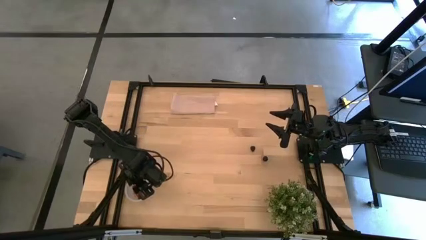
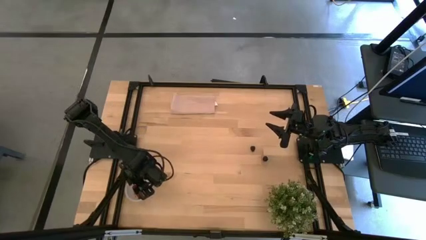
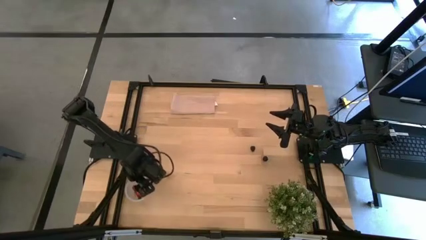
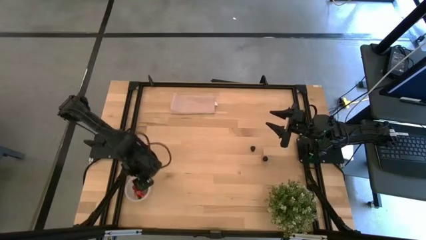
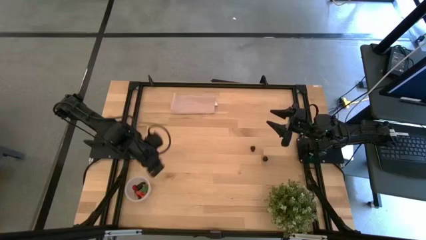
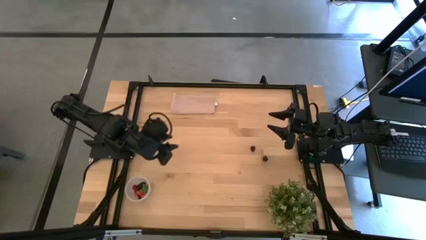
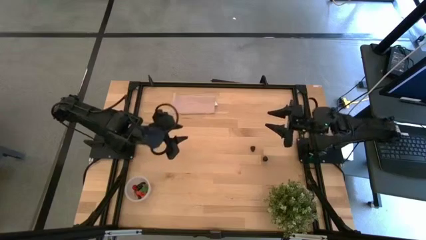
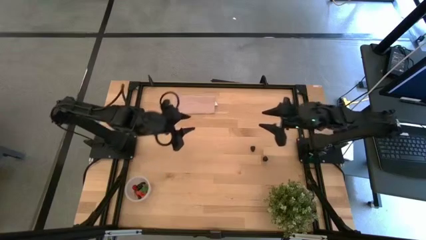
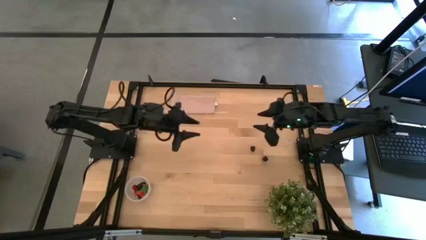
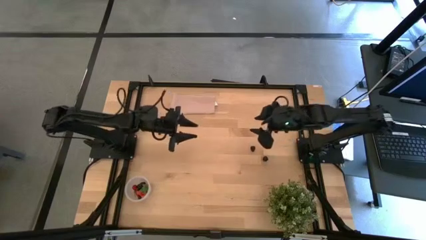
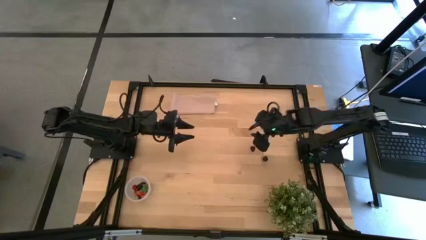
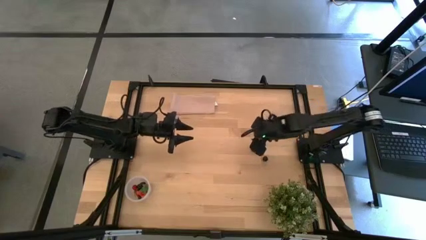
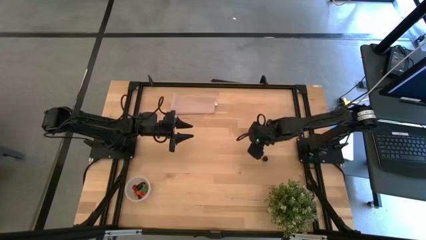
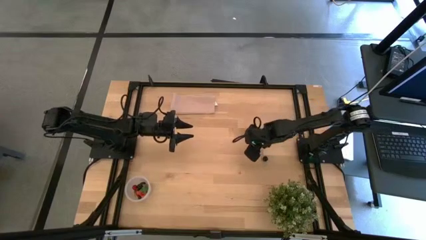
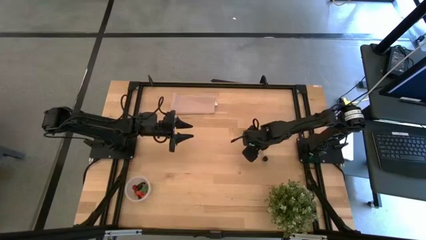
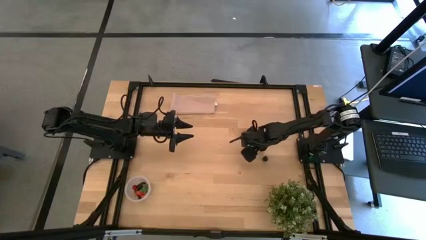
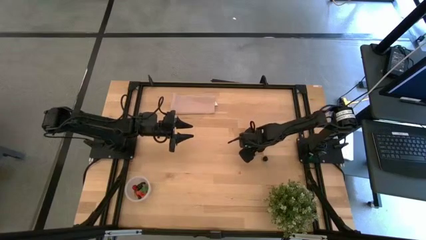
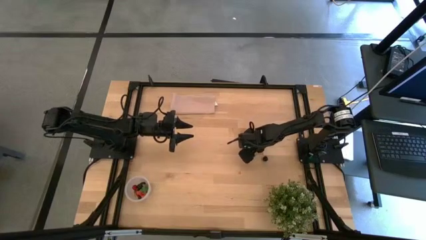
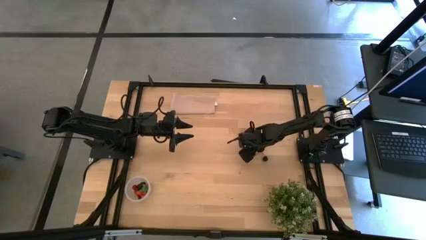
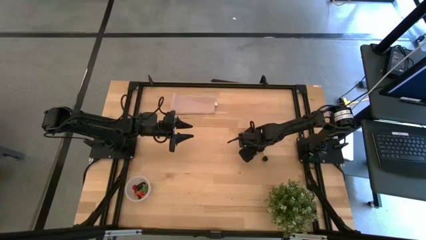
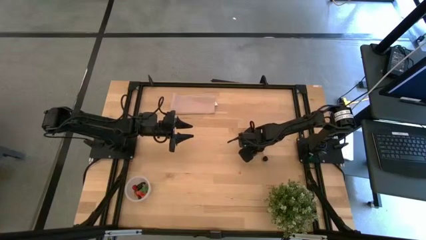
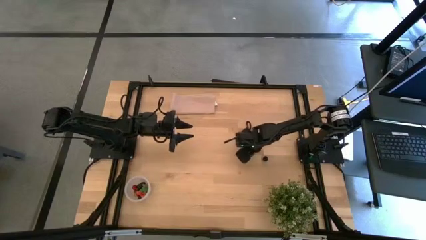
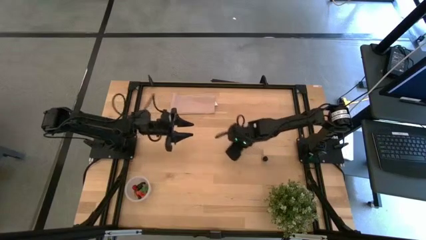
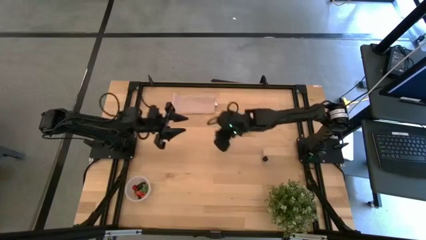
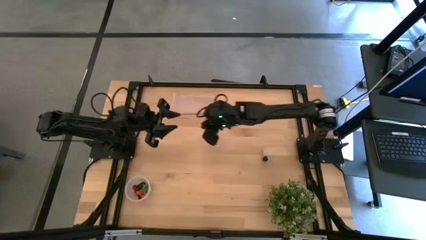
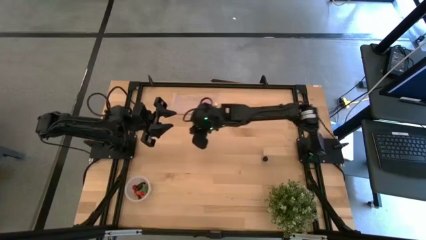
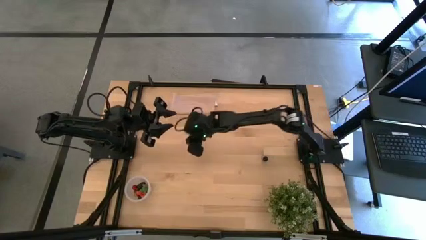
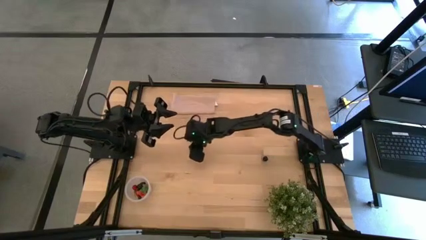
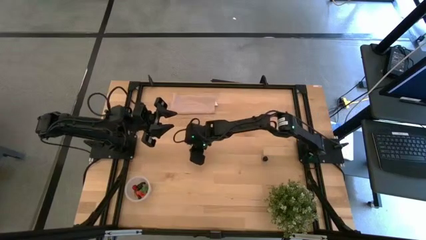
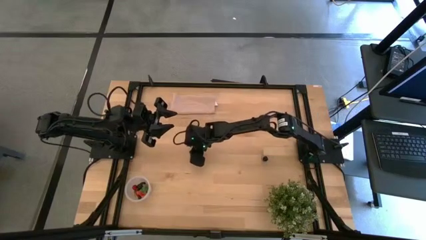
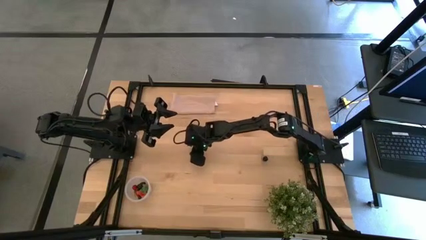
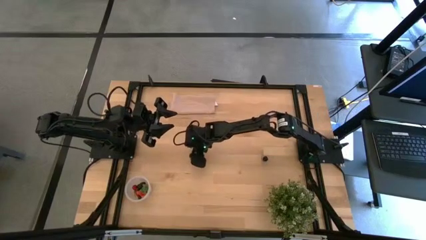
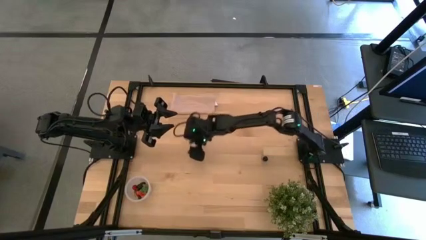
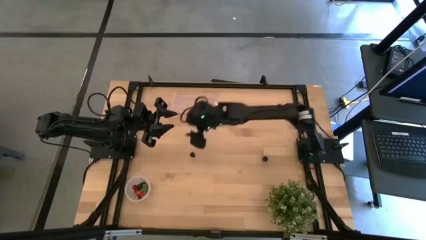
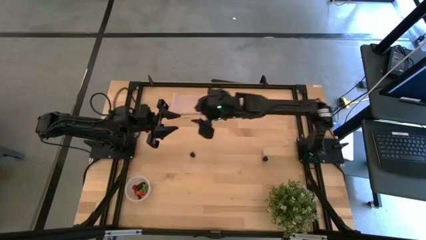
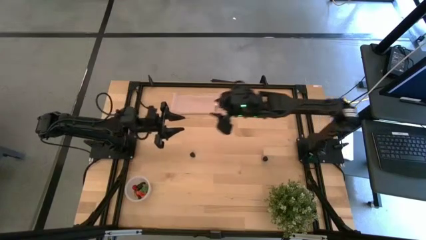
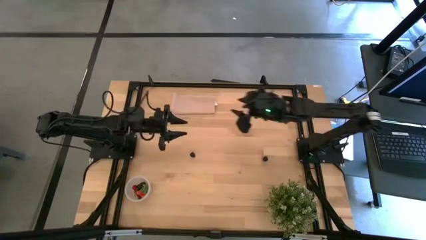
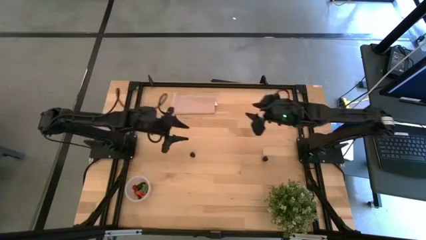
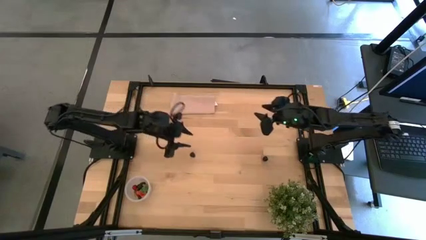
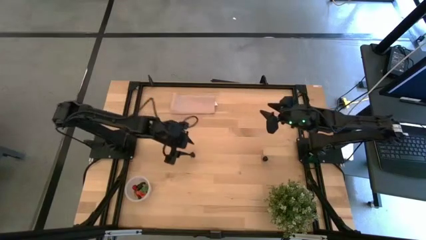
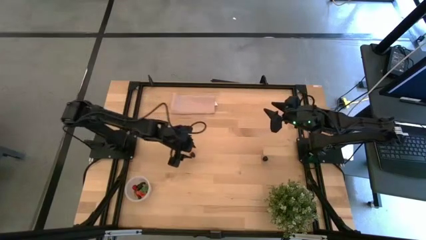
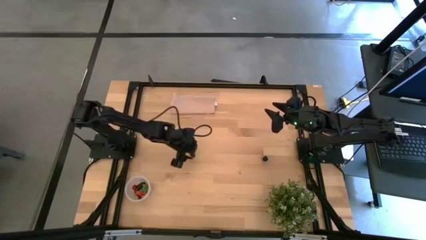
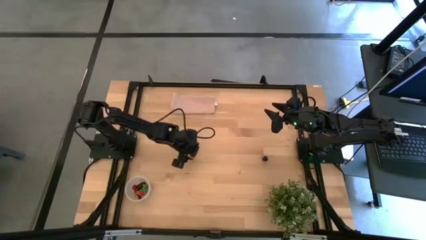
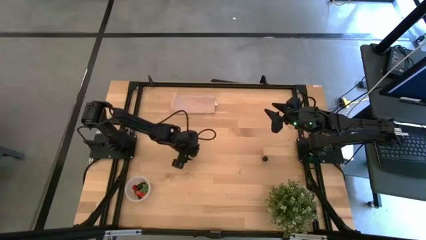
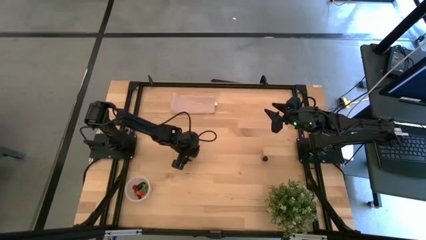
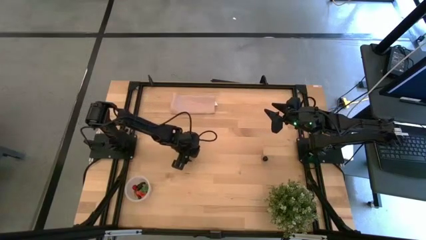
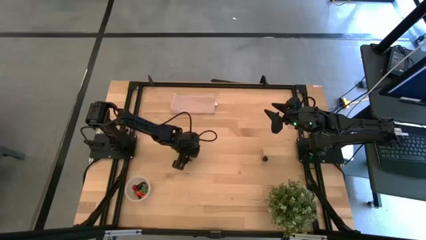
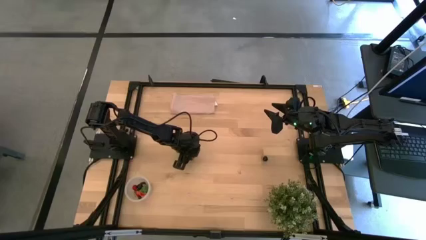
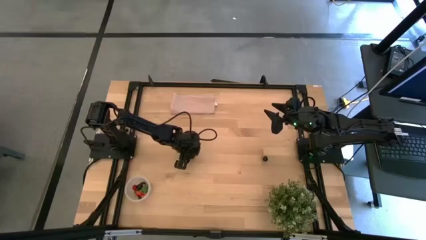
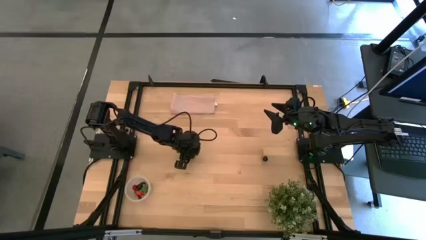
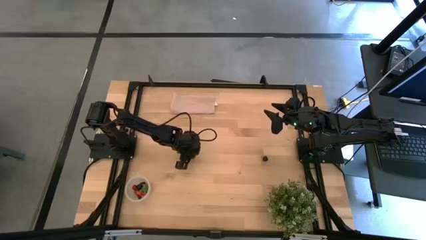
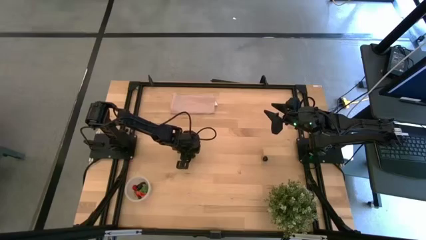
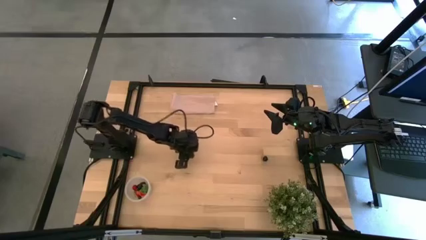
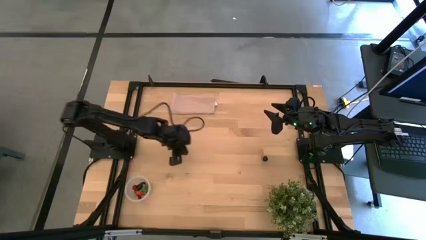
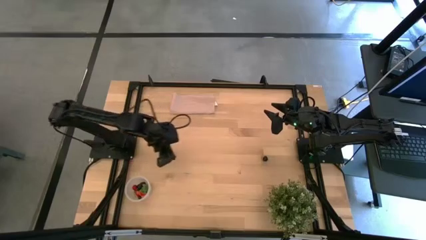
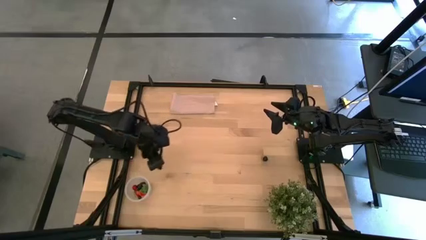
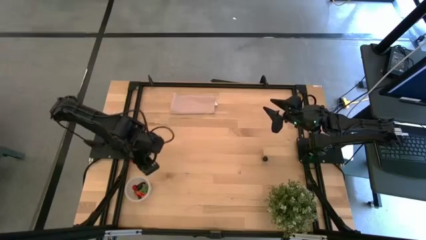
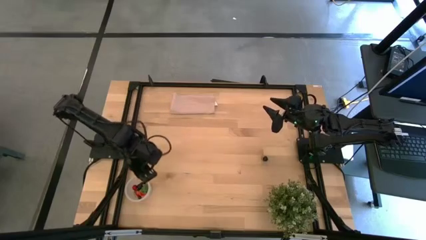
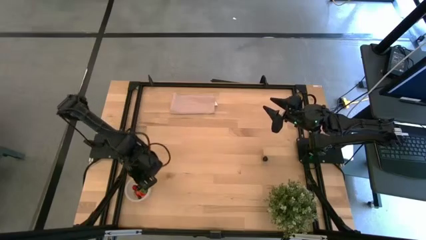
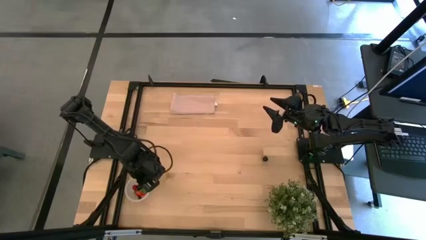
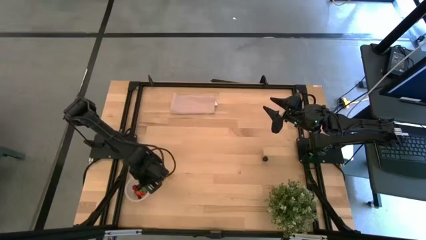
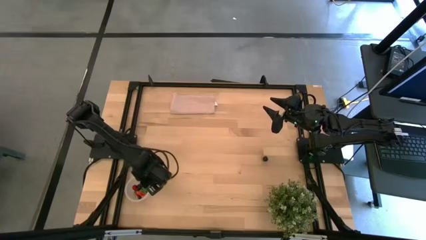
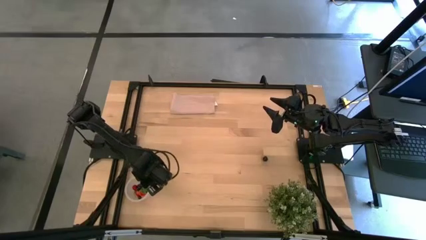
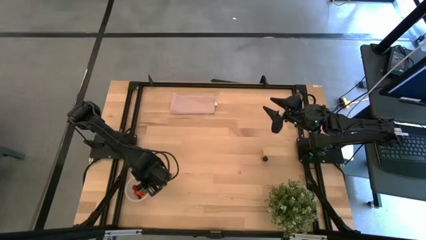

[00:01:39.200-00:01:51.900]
Task: Pick and placing Produce into tupperware
Put the blackberry into the transparent bin
